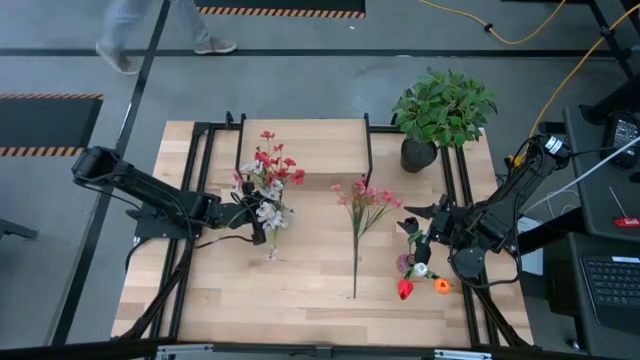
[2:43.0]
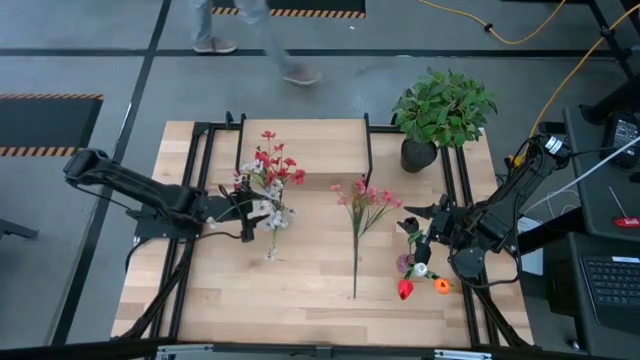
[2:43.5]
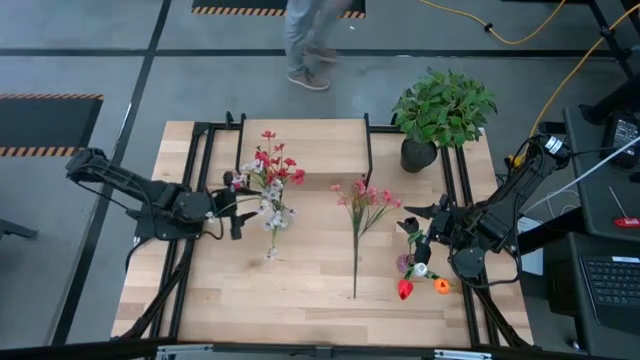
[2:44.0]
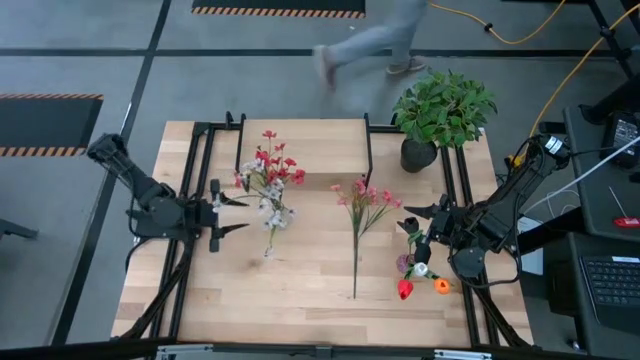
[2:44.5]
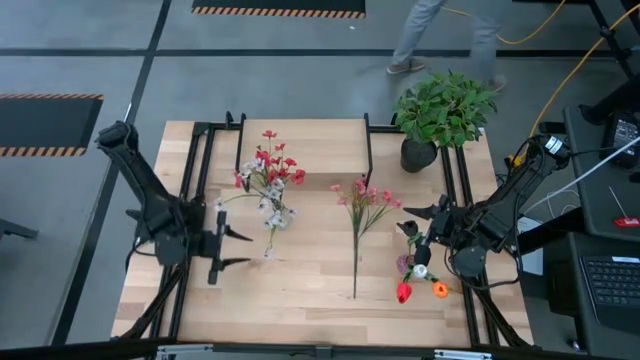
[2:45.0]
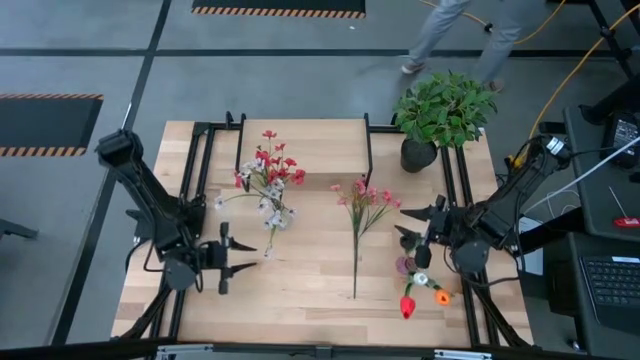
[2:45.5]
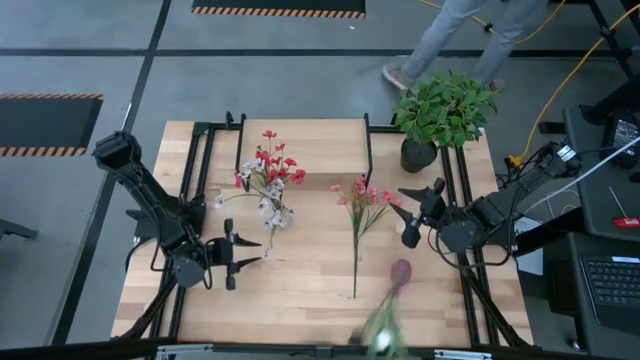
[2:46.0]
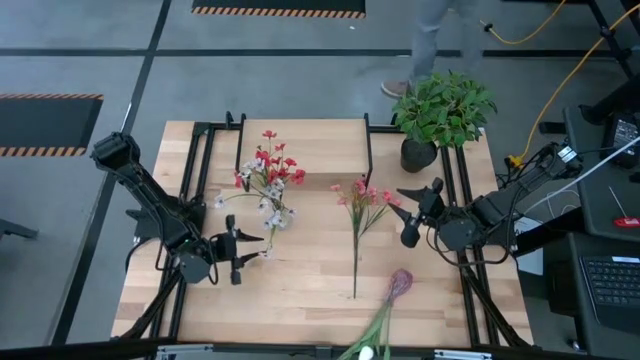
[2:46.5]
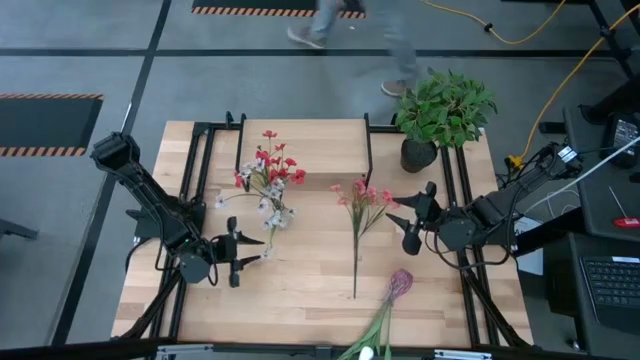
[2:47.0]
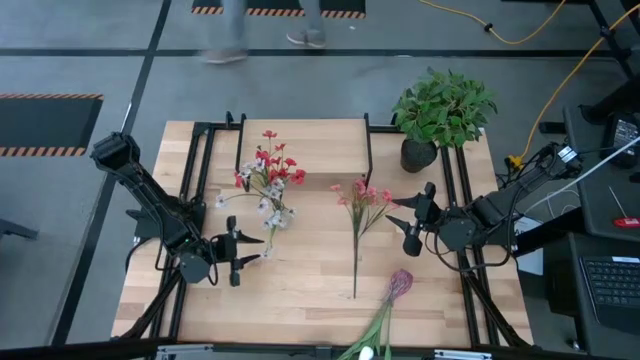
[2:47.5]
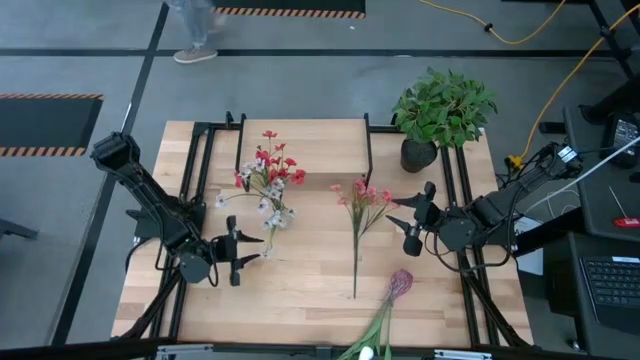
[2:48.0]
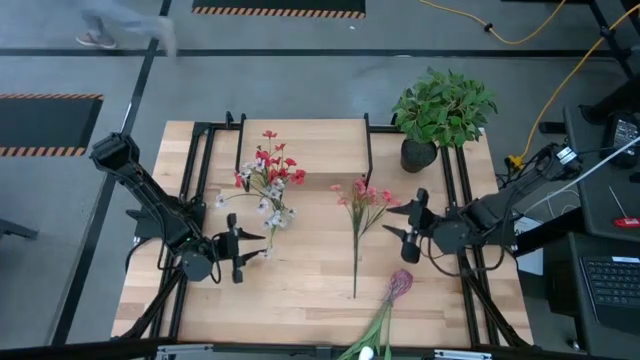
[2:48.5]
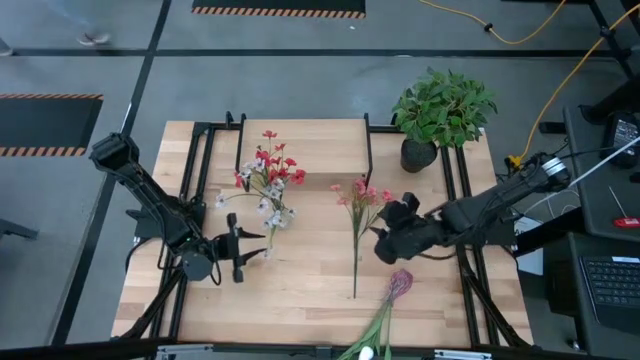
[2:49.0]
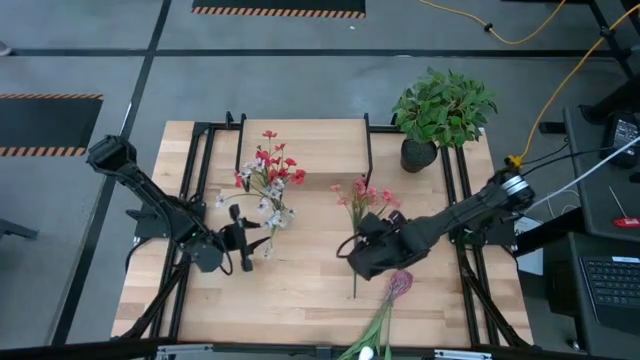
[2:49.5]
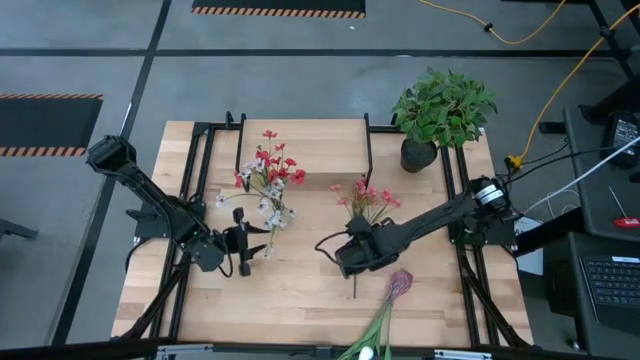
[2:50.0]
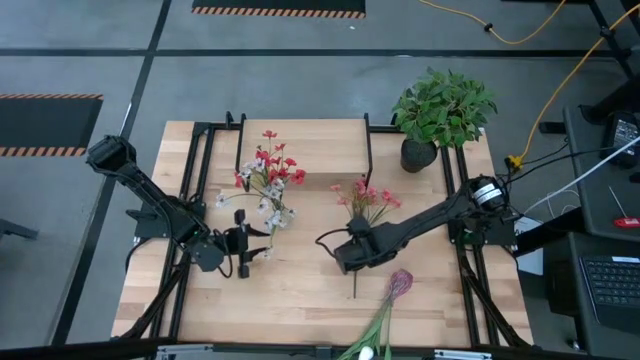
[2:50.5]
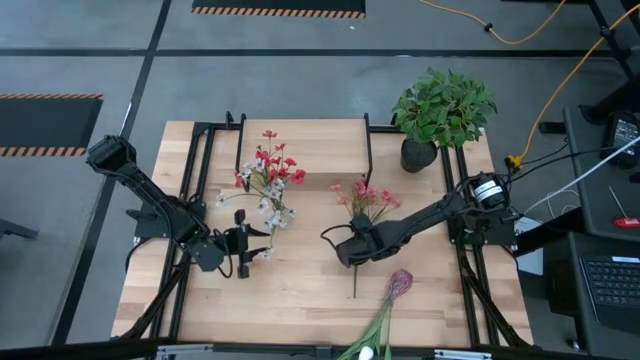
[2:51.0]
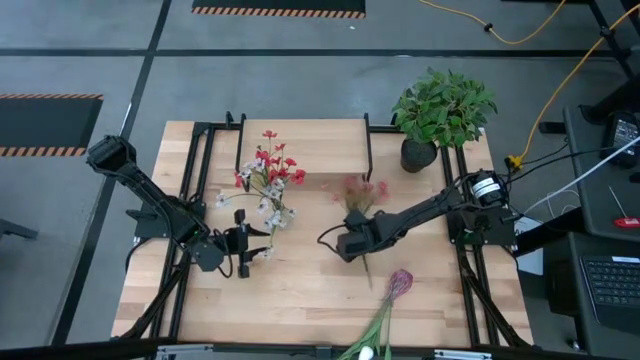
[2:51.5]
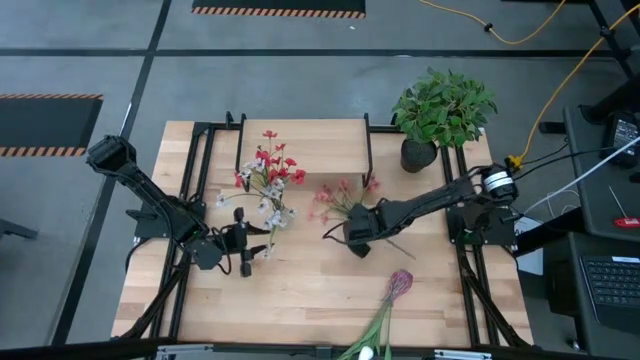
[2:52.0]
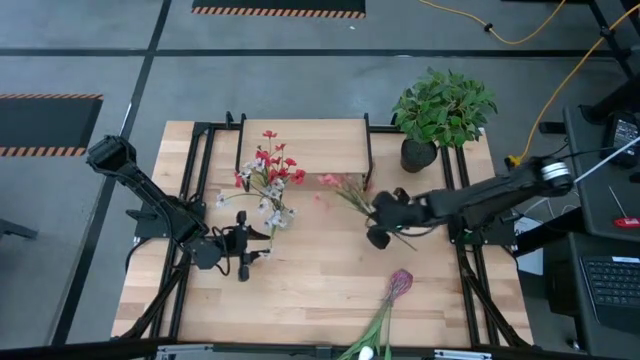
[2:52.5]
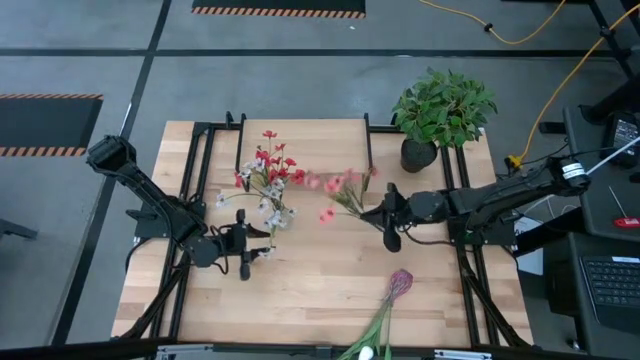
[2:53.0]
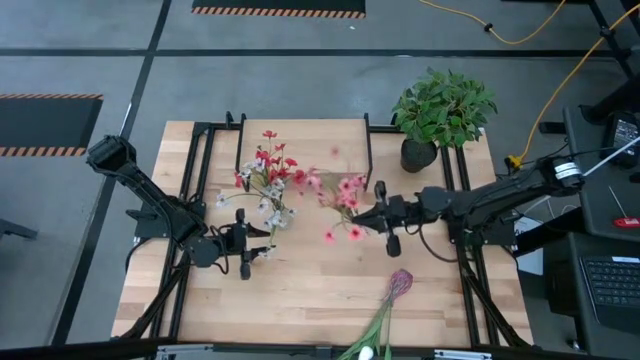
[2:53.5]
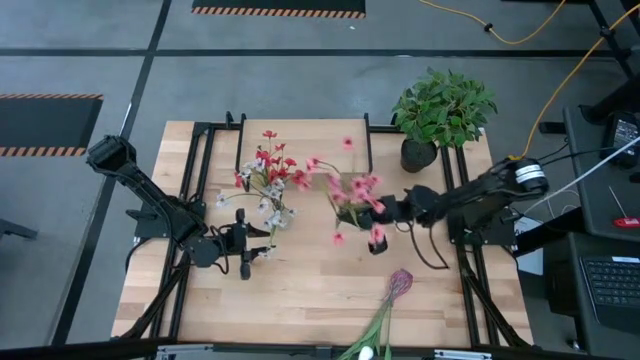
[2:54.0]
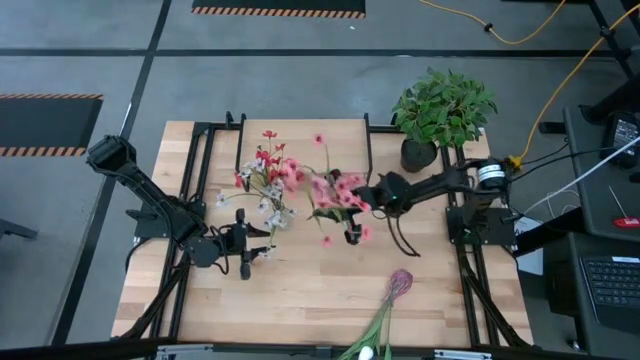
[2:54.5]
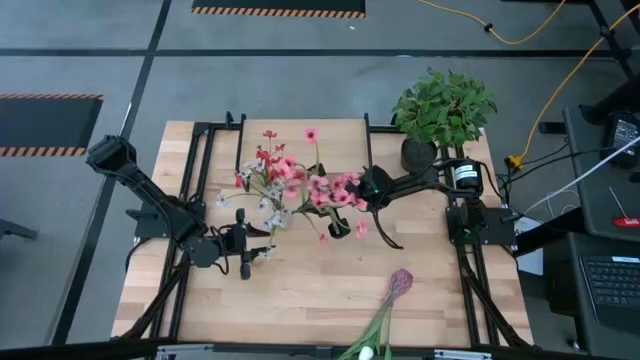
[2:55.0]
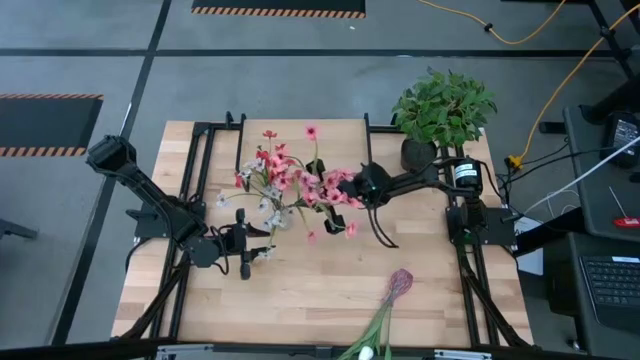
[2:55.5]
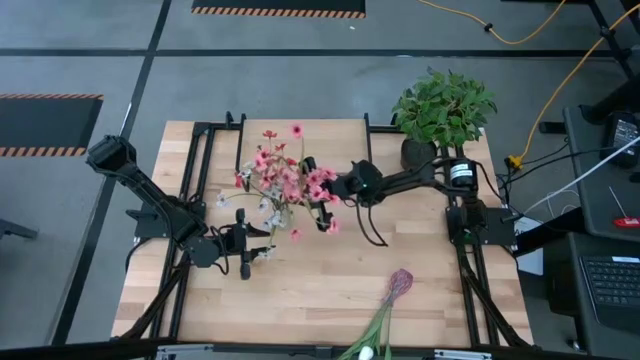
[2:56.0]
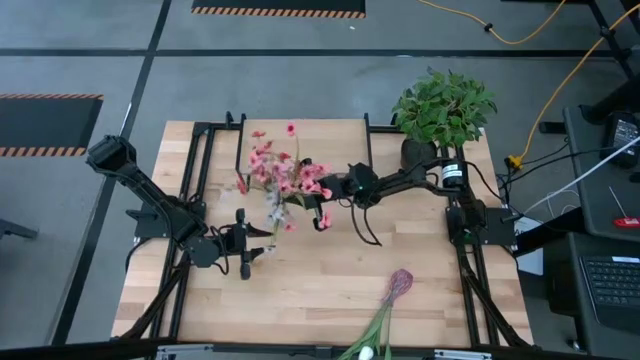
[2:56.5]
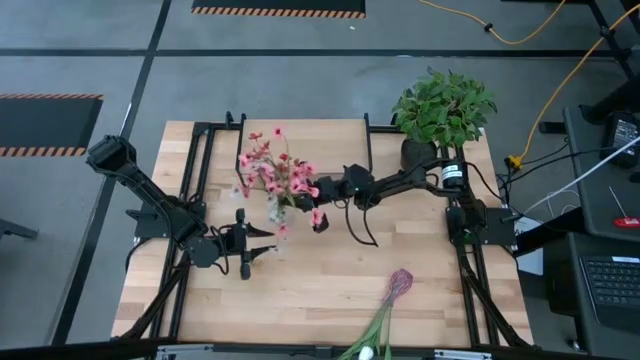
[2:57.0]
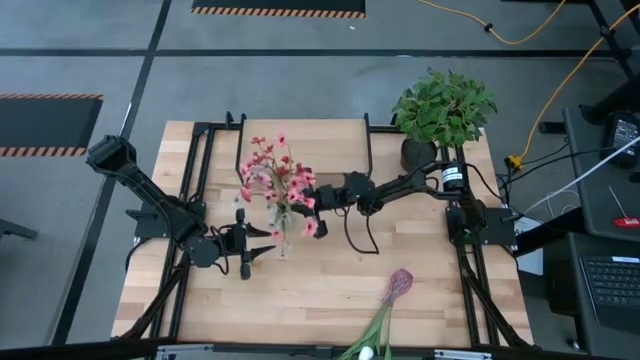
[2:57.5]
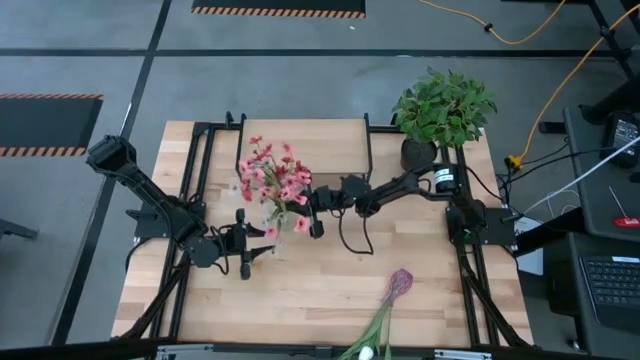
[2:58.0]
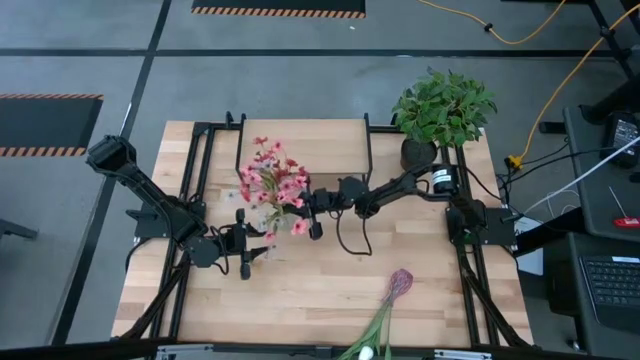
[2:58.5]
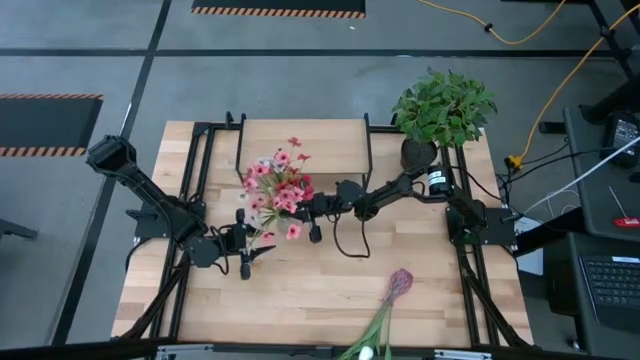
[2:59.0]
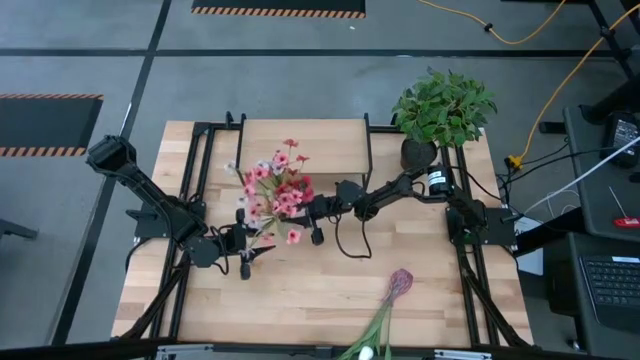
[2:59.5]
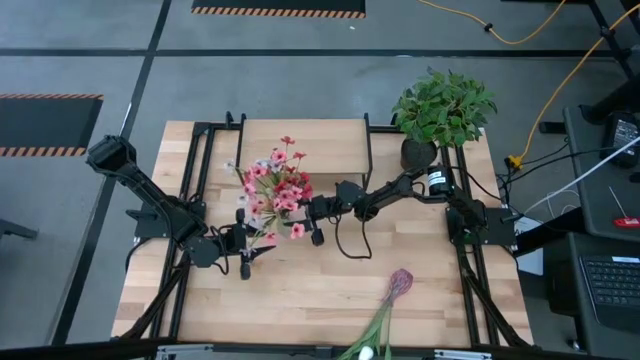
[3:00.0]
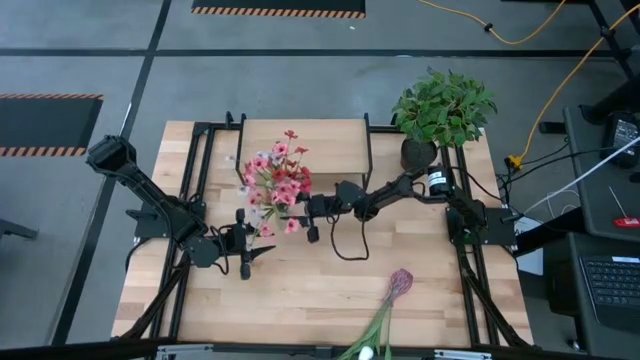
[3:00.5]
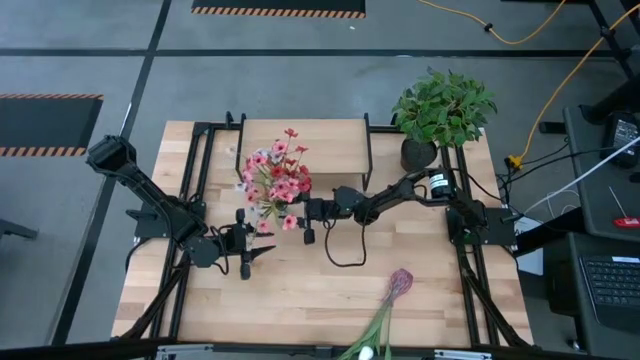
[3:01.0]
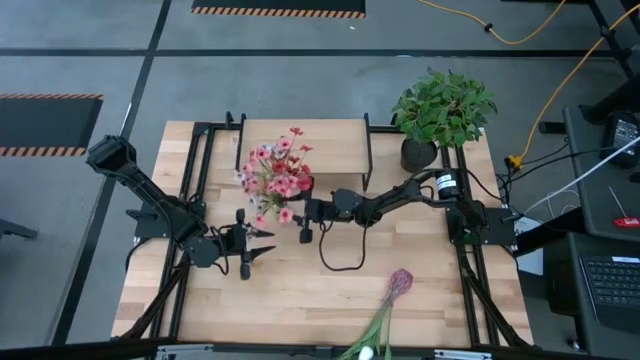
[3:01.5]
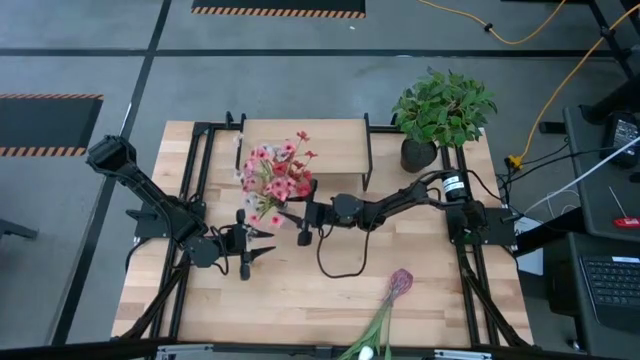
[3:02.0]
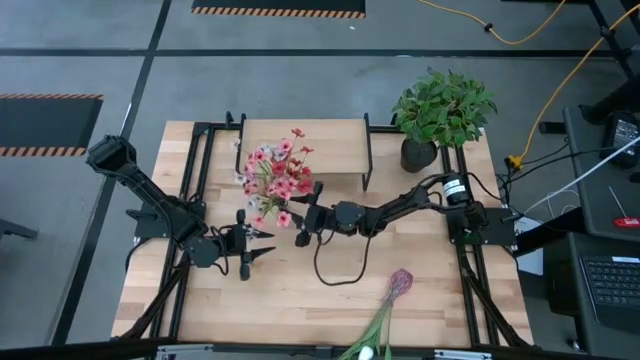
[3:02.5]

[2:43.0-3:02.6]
Task: Pick and place flowers into a vace then onto a shelf
Put the pink flowers into the transparent vase

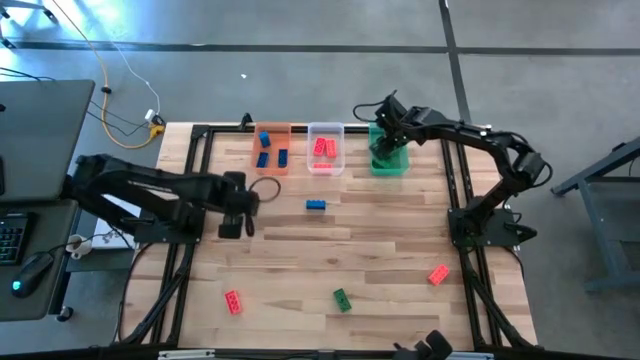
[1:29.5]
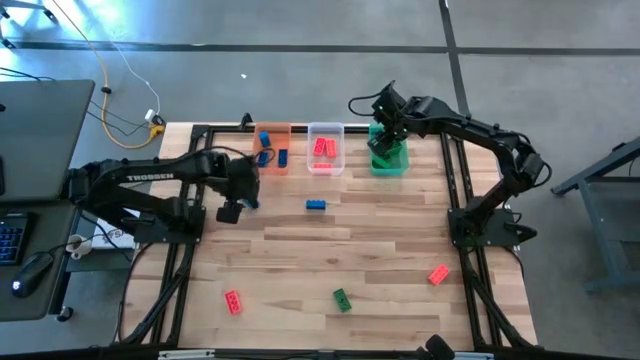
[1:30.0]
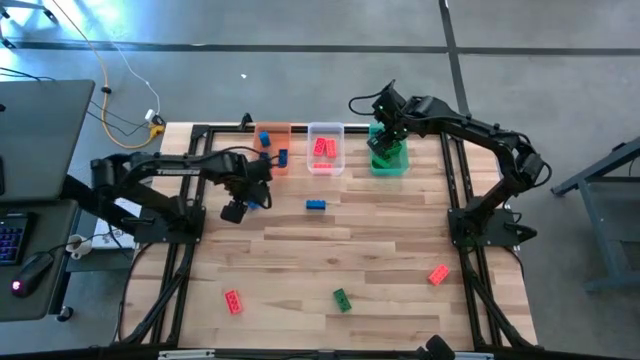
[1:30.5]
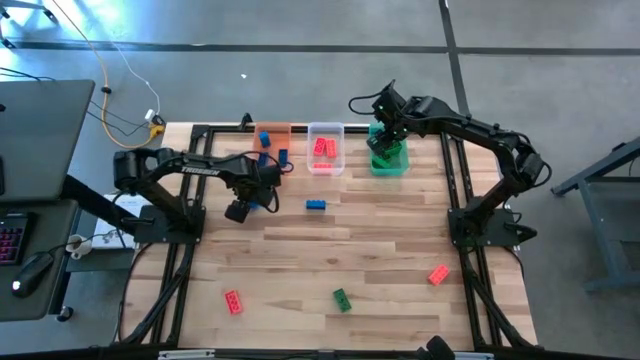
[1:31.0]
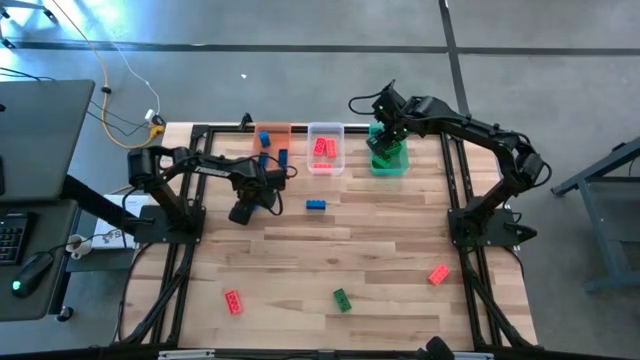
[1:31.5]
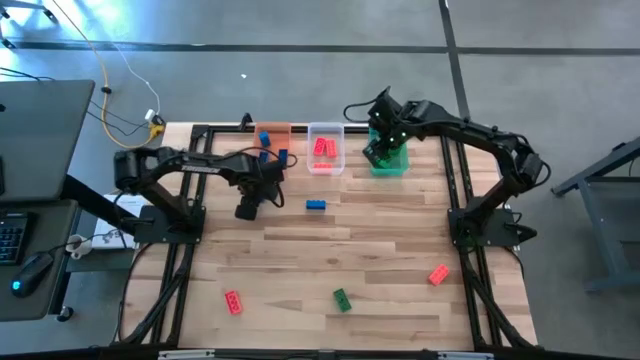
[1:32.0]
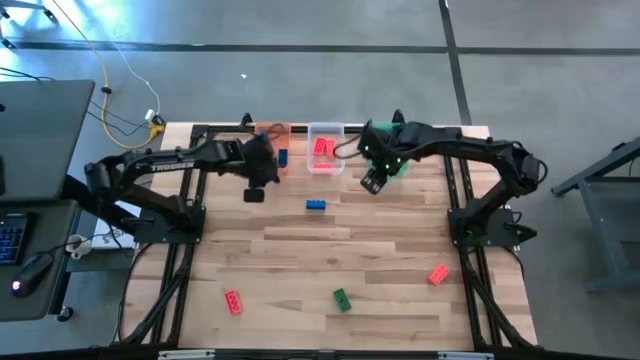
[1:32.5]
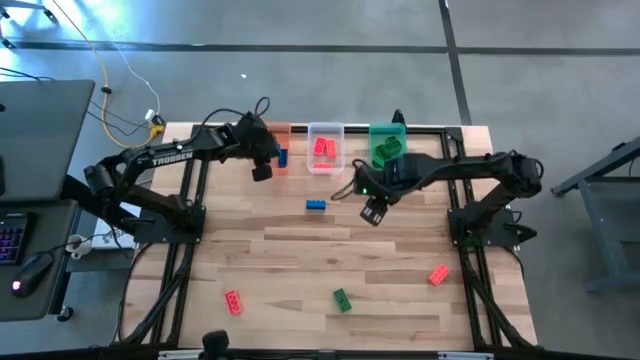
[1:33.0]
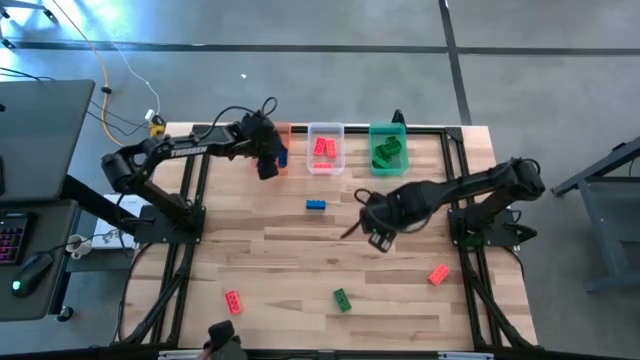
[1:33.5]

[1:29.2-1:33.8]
Task: Sort & place blocks by color
Put the blue game piece into the orange bin
